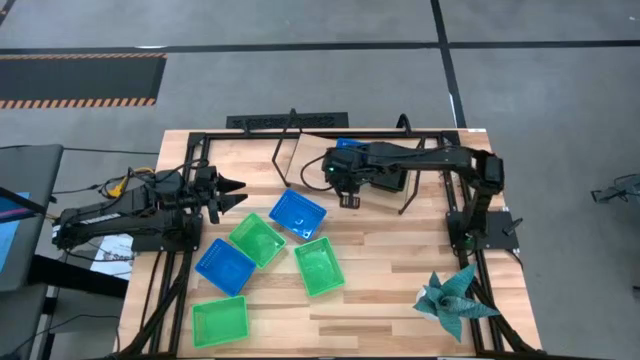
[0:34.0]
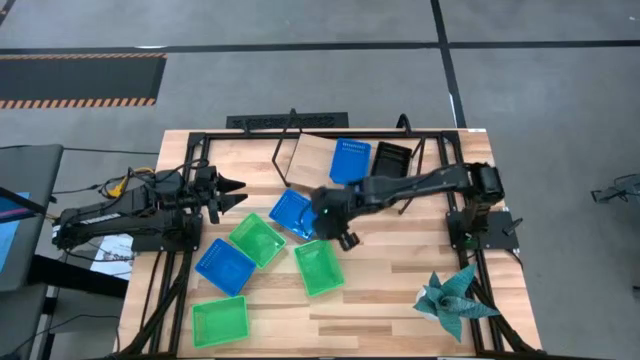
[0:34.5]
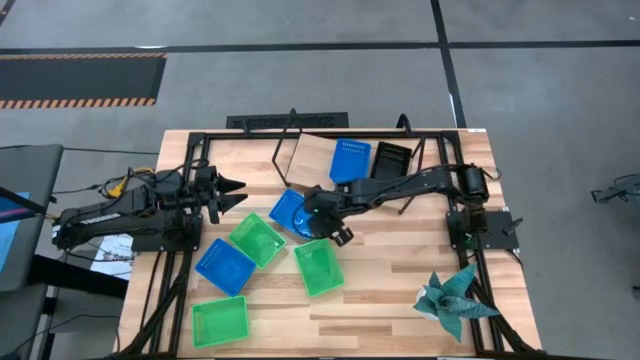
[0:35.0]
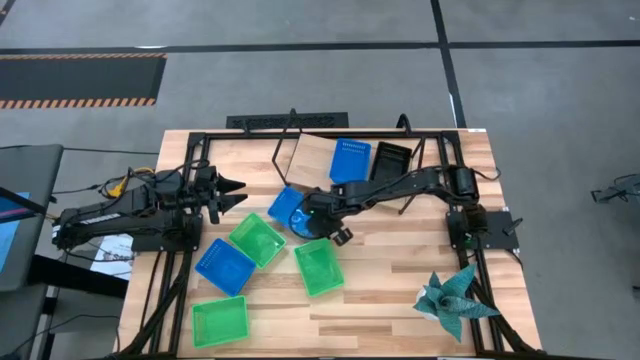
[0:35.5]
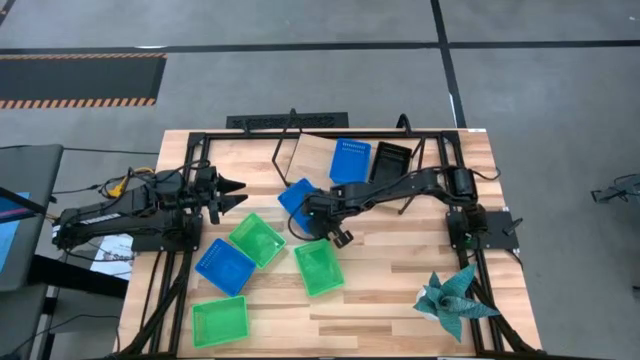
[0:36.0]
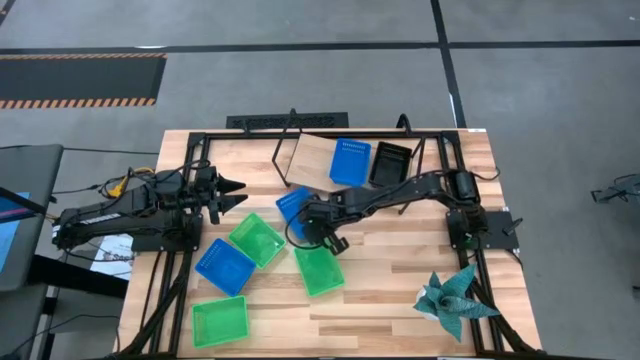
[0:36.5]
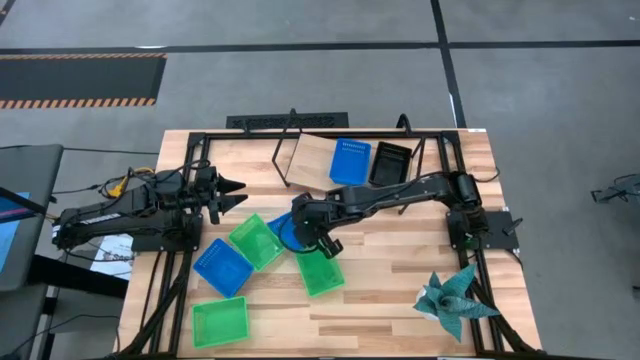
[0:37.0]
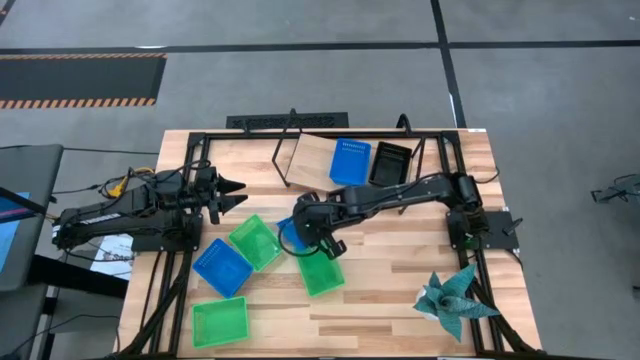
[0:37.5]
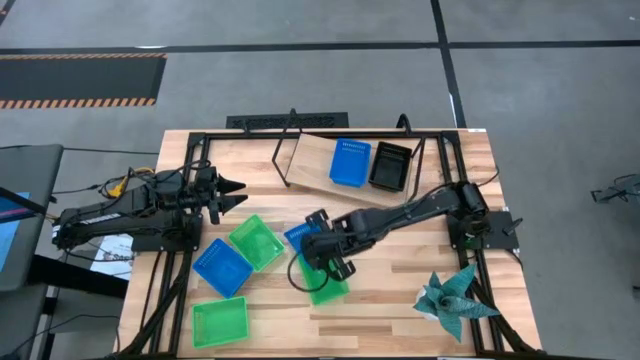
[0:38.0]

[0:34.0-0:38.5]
Task: Stack baskets on shelf by color
Stack the top blue bin on top of the blue bin on the shelf

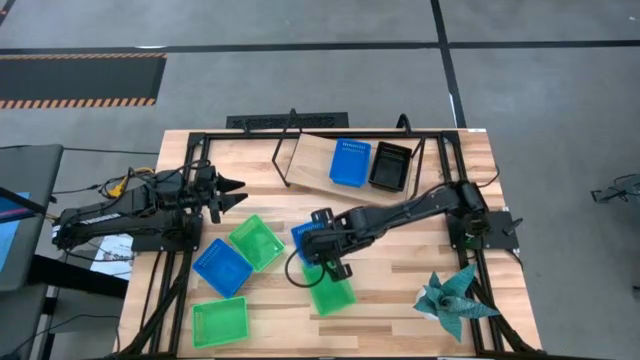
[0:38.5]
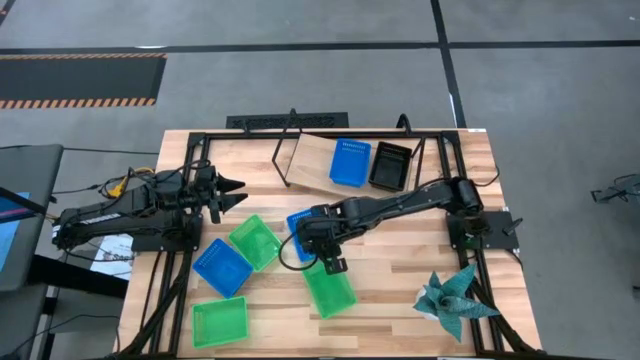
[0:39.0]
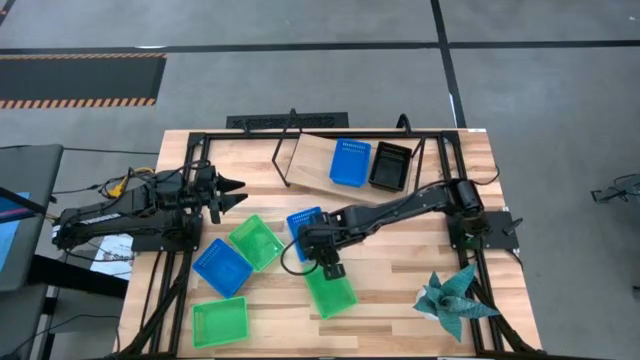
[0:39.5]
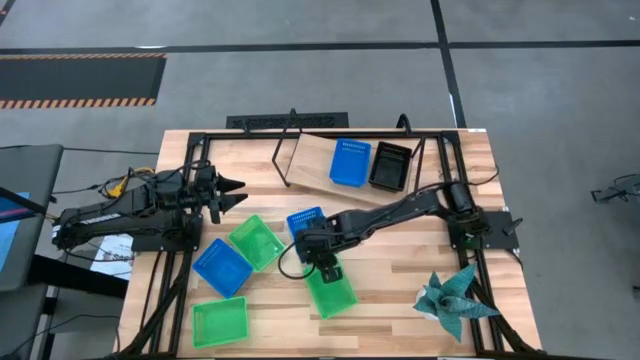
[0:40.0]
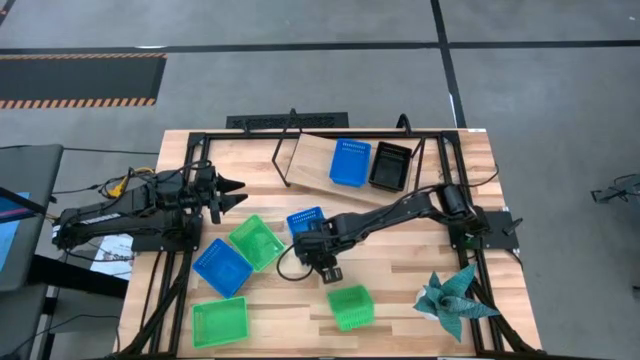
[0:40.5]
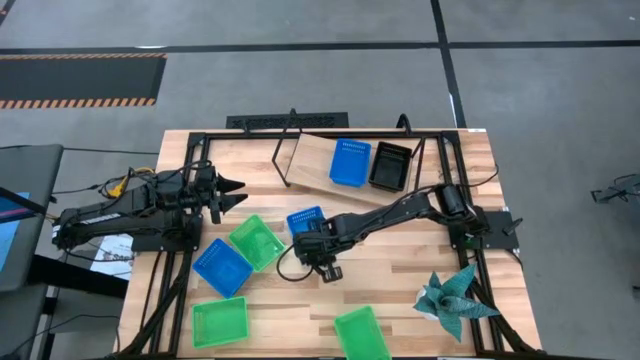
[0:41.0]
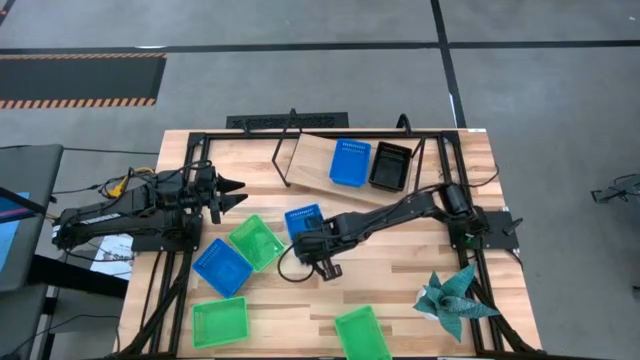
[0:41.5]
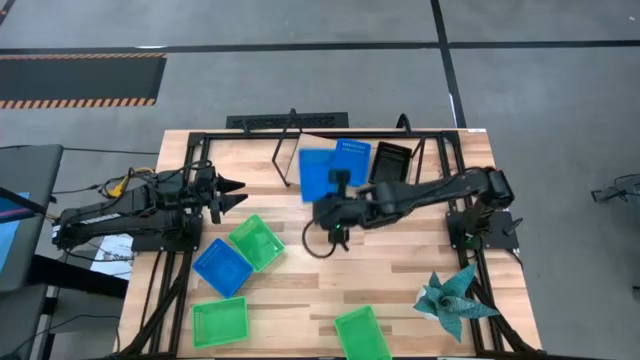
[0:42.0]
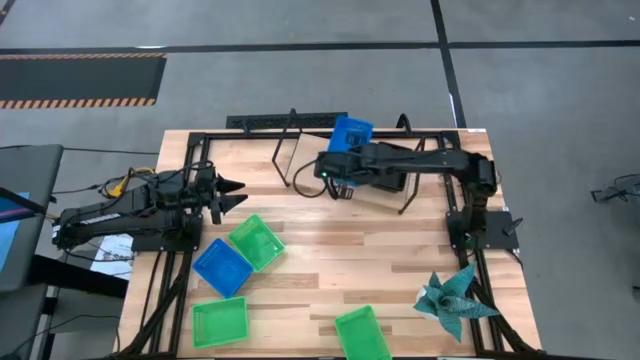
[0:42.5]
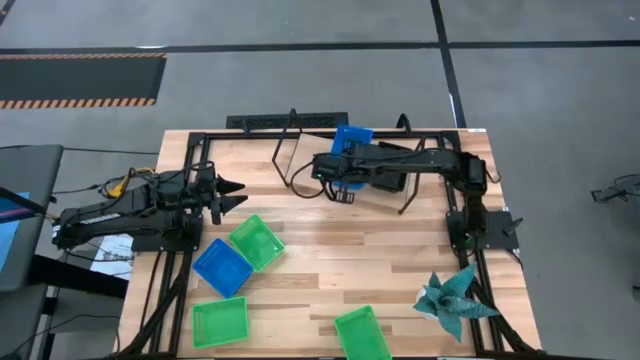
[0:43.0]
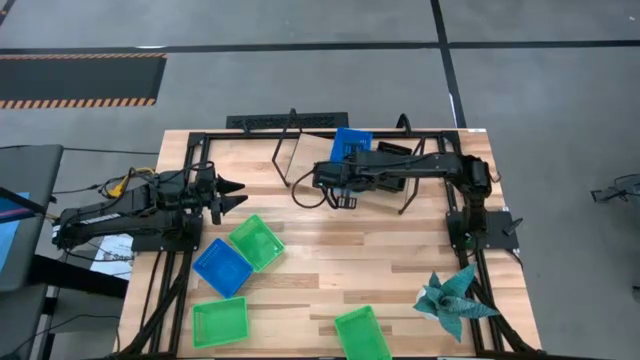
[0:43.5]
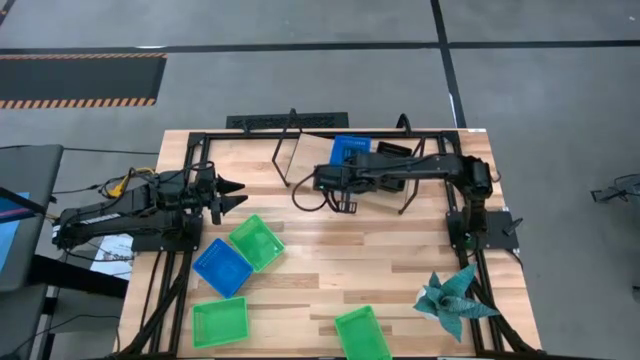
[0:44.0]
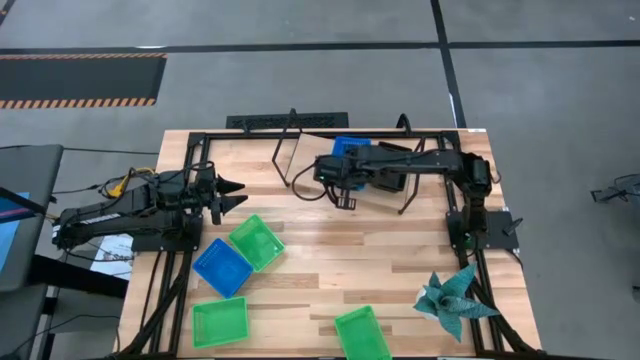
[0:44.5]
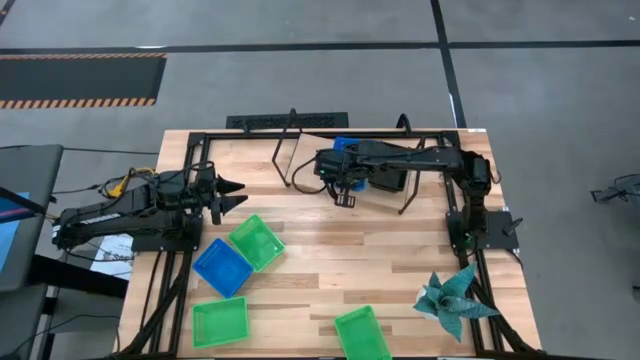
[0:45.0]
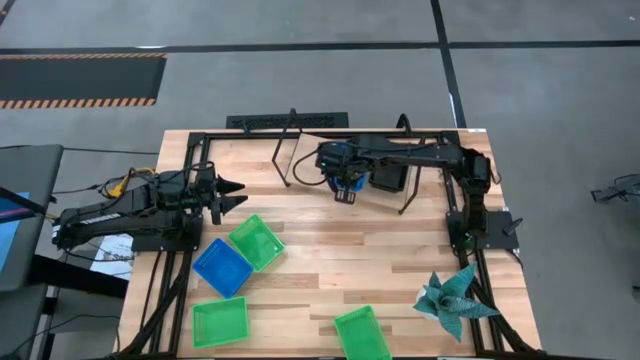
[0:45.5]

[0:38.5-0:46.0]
Stack the top blue bin on top of the blue bin on the shelf

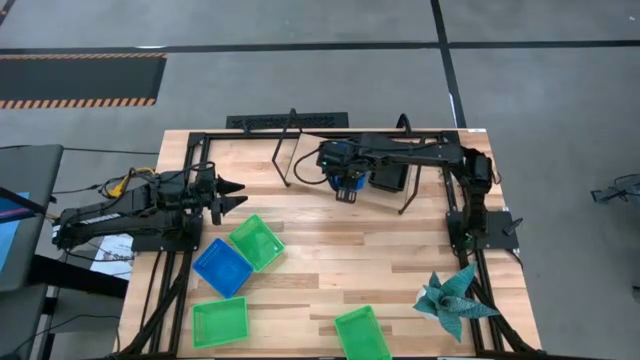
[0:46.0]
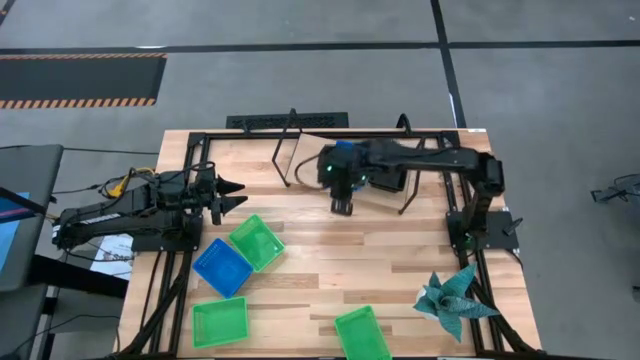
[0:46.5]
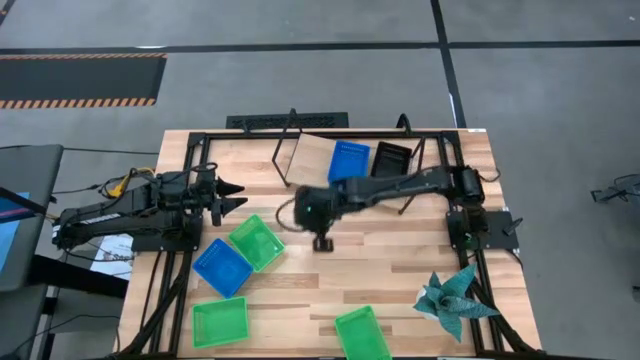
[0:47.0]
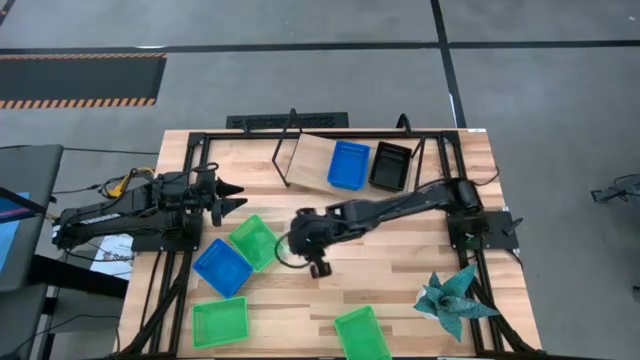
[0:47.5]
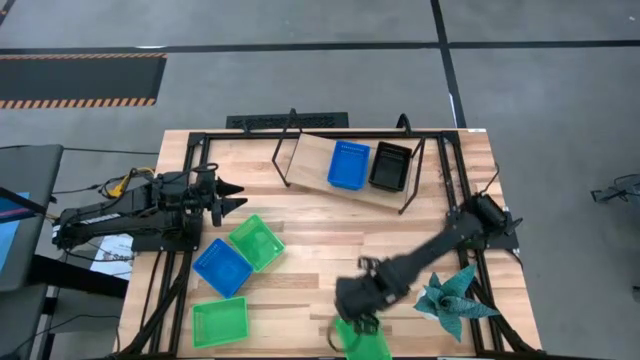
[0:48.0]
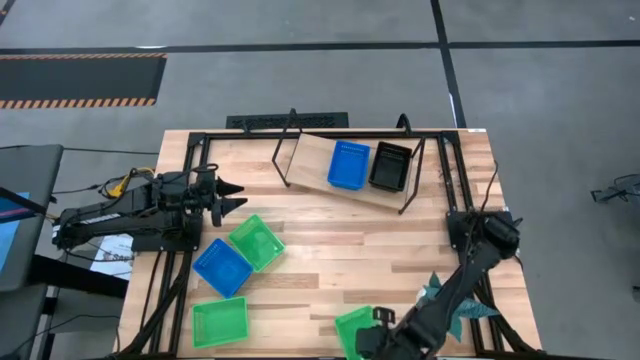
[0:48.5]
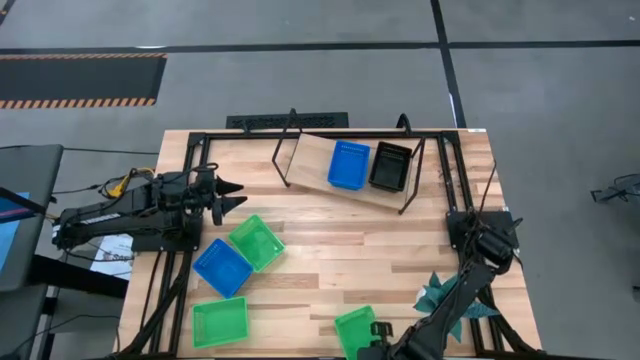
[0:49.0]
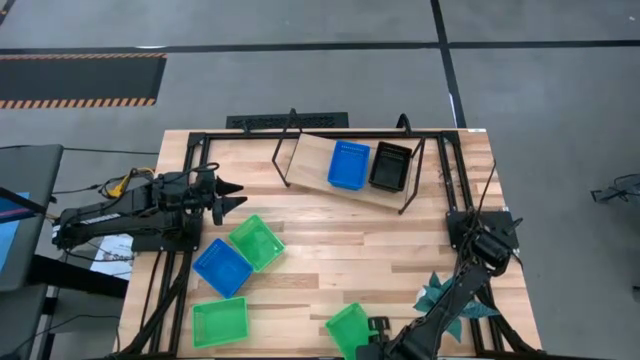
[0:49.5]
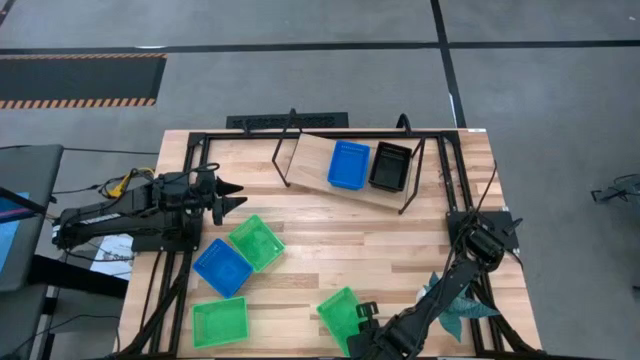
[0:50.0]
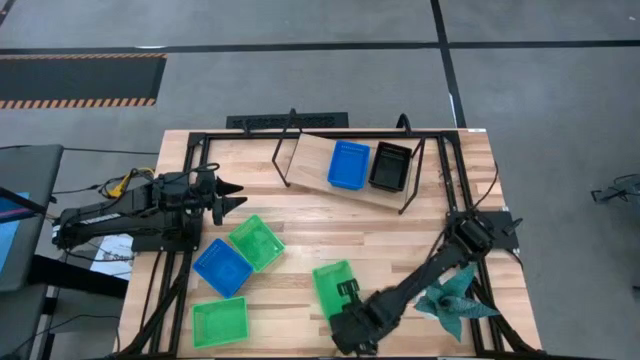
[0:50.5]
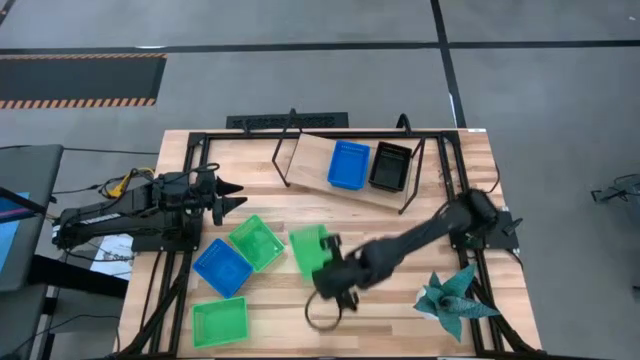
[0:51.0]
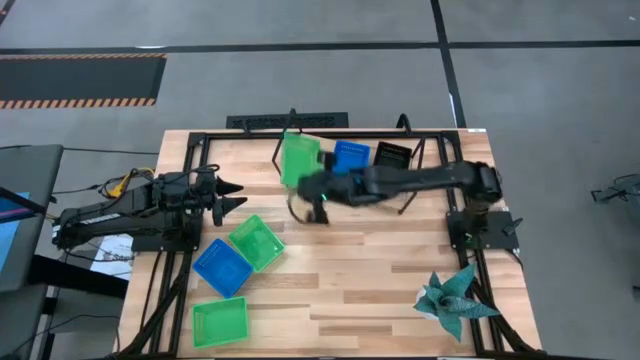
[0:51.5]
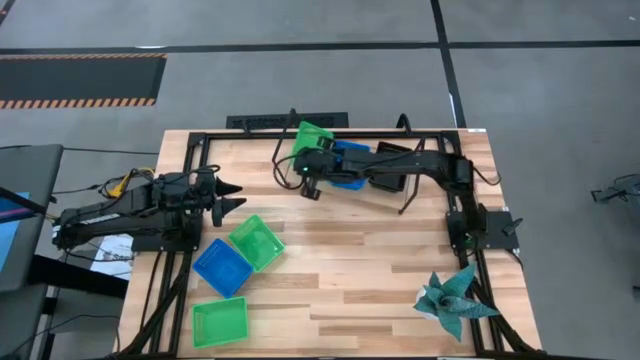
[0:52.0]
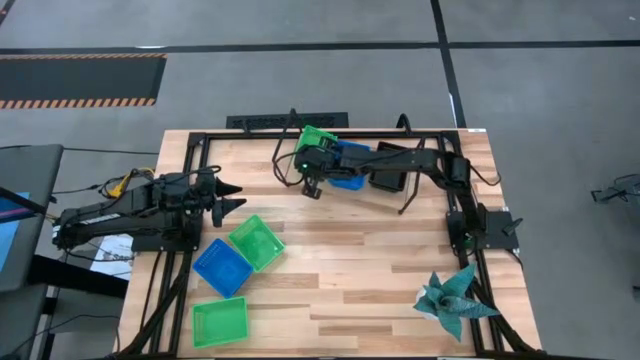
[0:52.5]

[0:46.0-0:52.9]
Put the bottom right green bin on the shelf

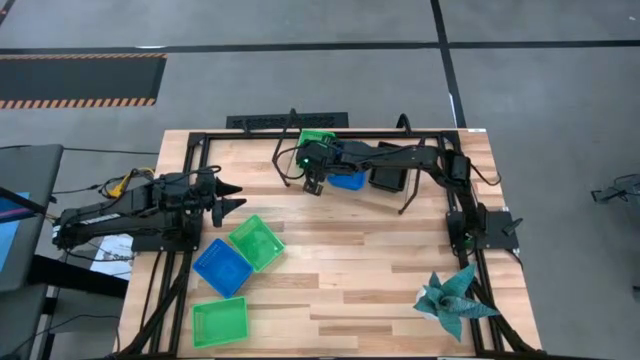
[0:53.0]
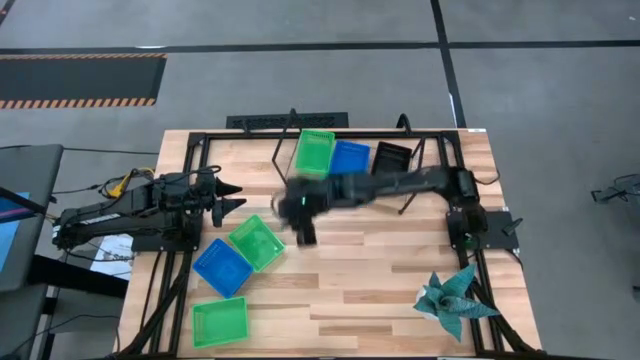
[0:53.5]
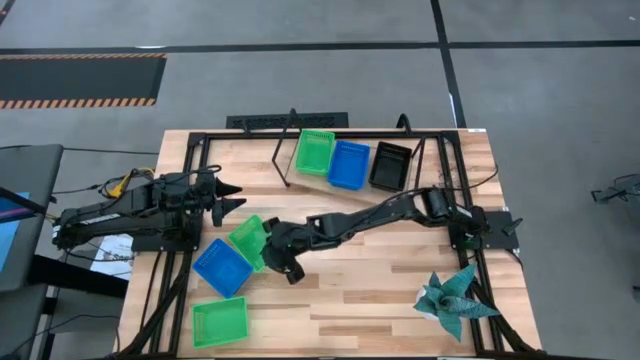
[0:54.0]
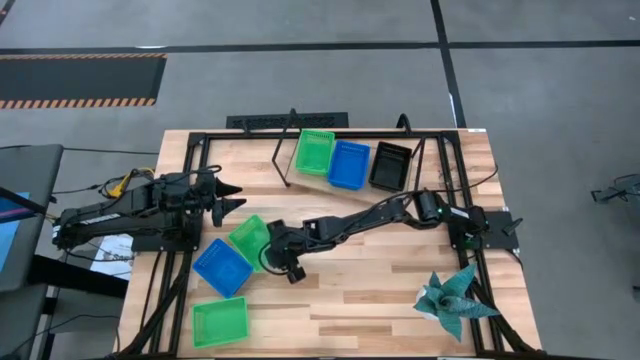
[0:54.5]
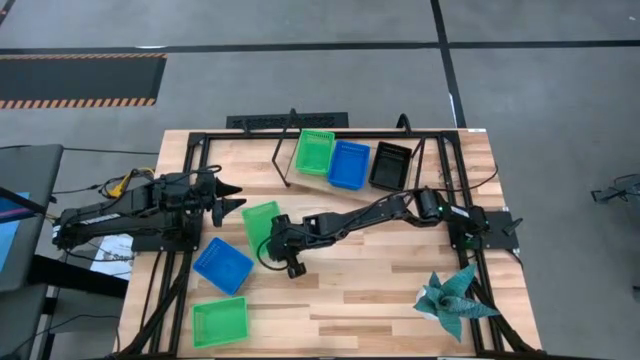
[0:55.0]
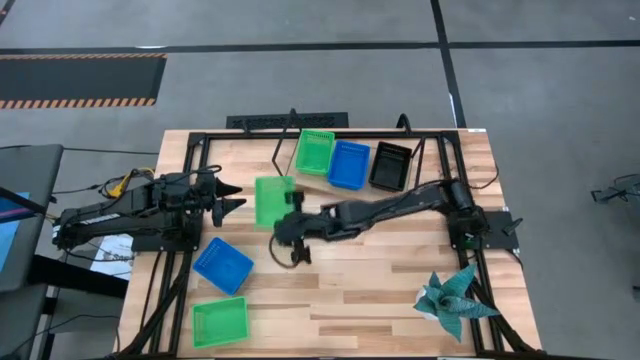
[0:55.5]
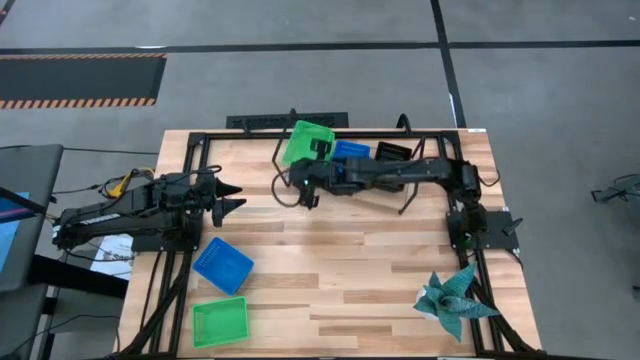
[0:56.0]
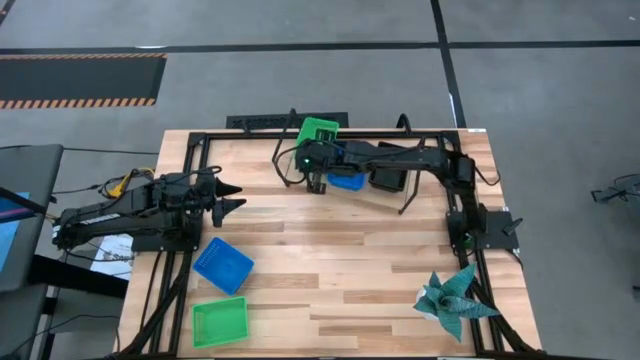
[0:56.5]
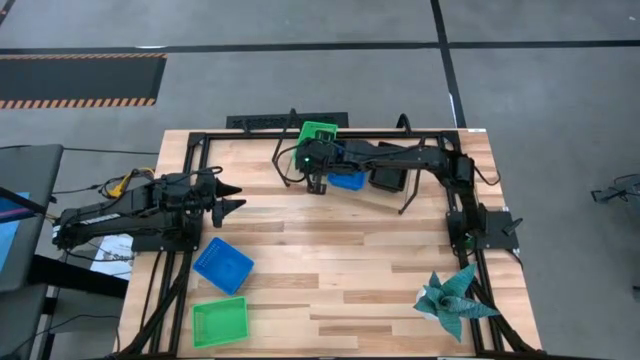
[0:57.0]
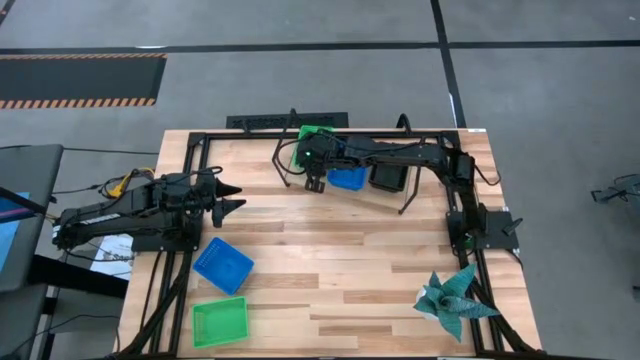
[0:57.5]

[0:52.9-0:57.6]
Stack the top green bin on top of the green bin on the shelf
